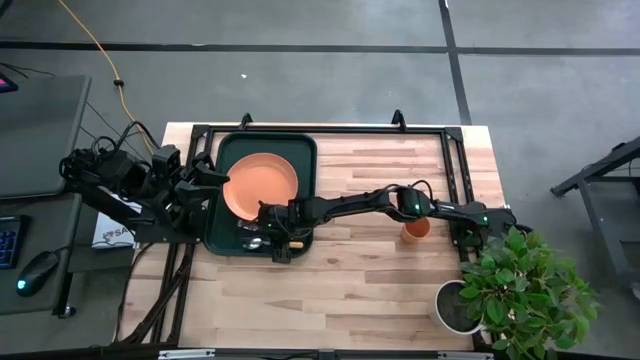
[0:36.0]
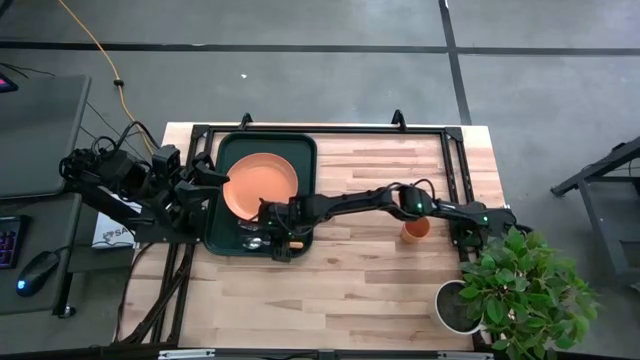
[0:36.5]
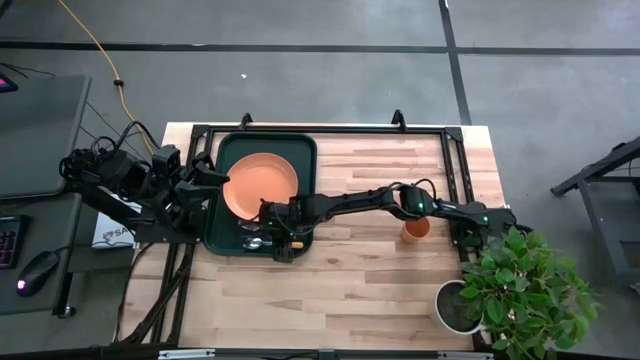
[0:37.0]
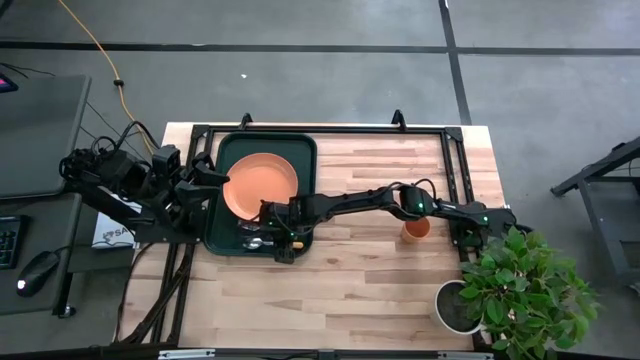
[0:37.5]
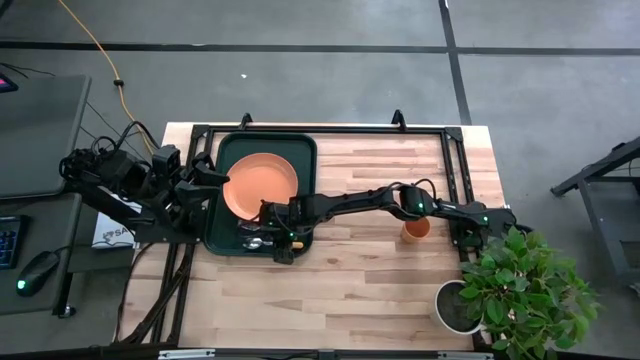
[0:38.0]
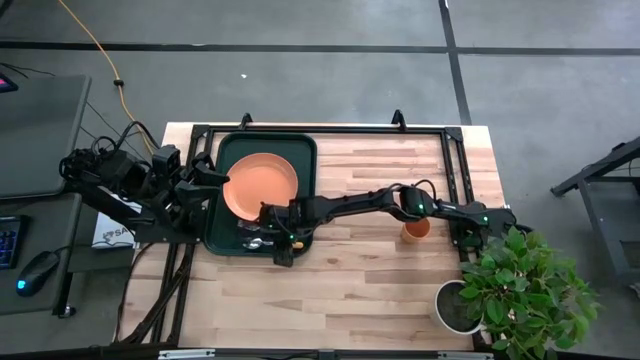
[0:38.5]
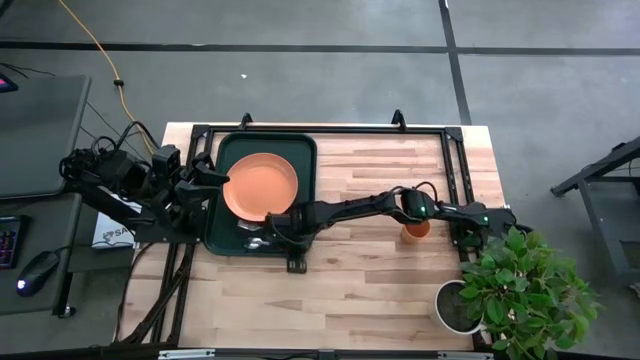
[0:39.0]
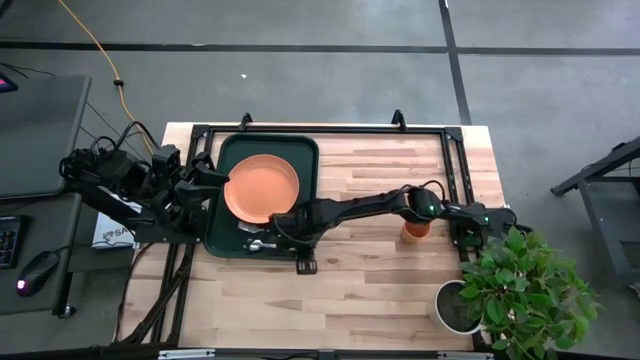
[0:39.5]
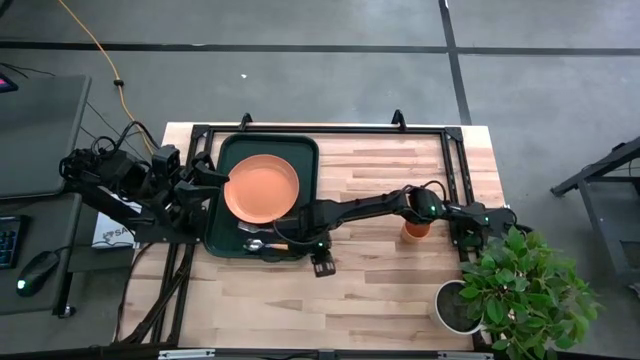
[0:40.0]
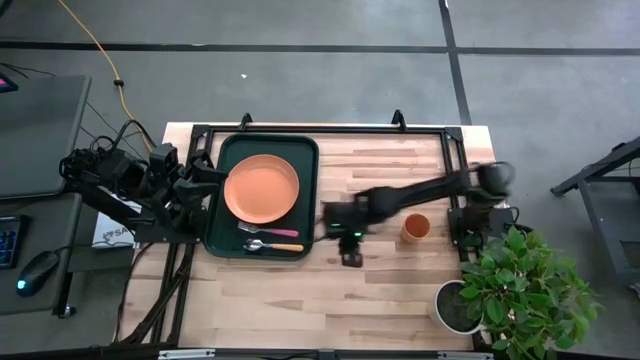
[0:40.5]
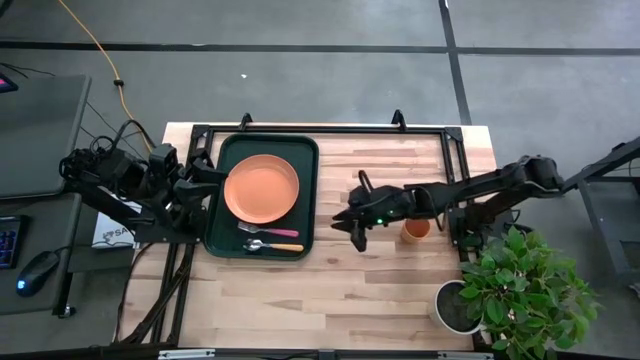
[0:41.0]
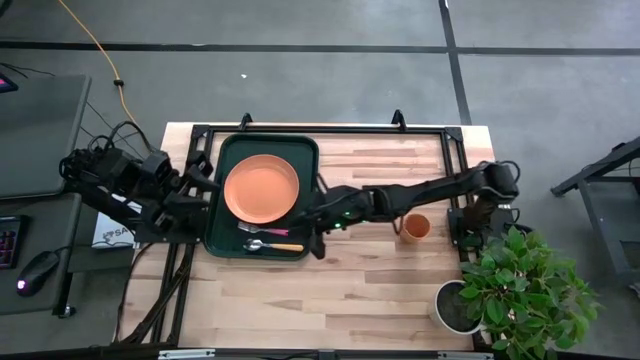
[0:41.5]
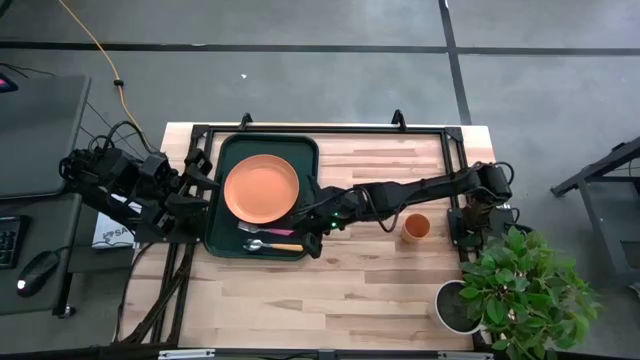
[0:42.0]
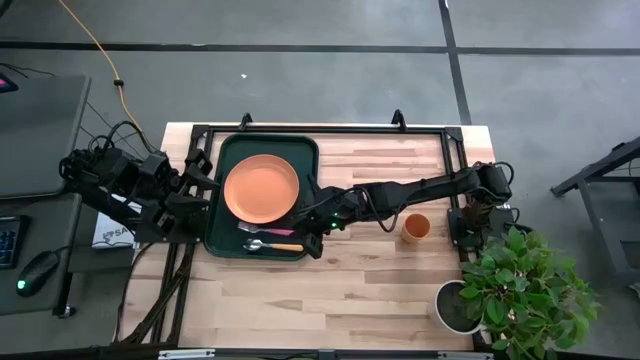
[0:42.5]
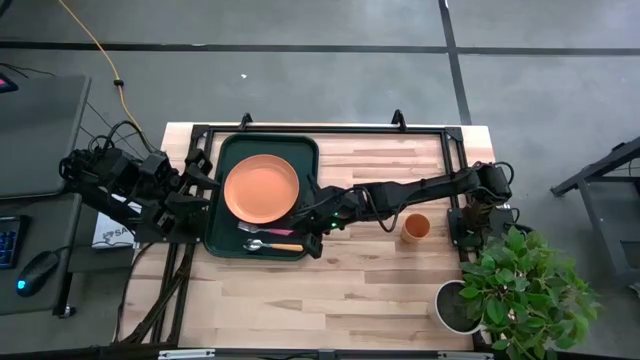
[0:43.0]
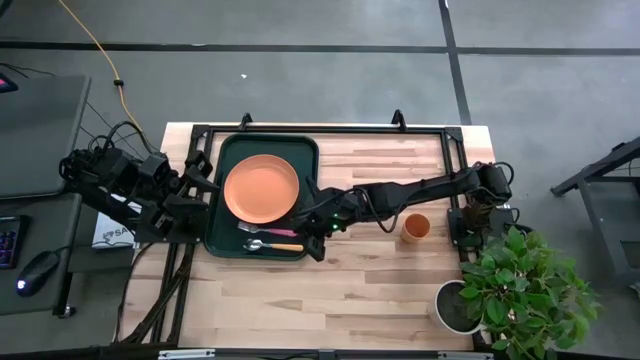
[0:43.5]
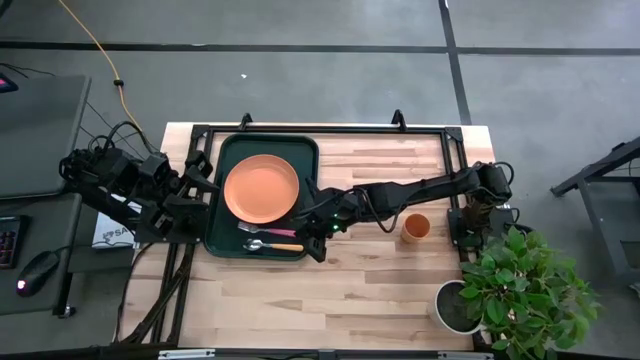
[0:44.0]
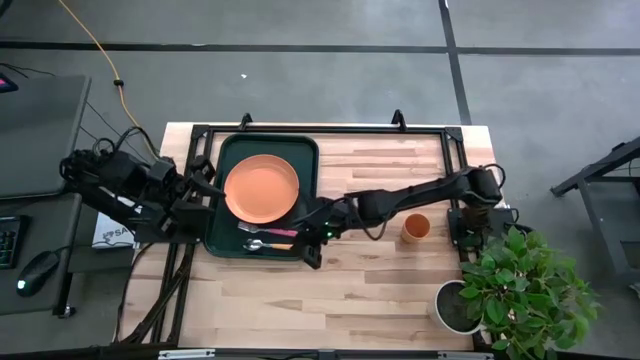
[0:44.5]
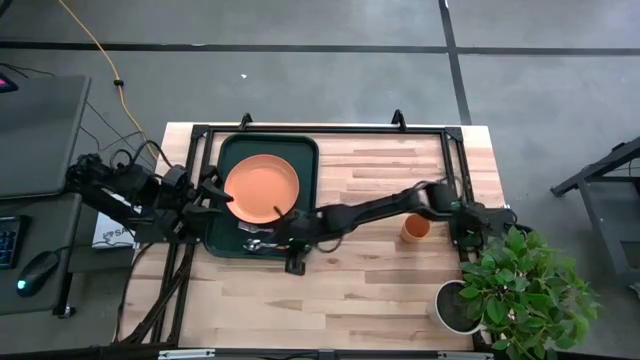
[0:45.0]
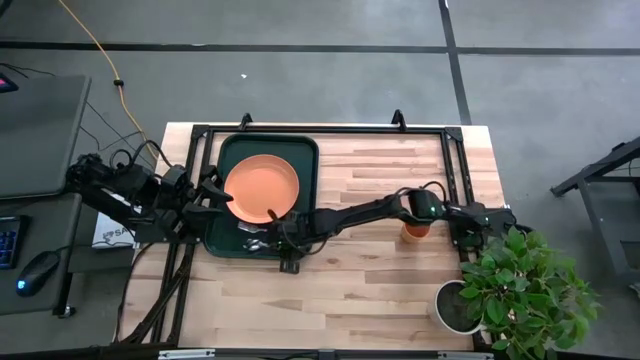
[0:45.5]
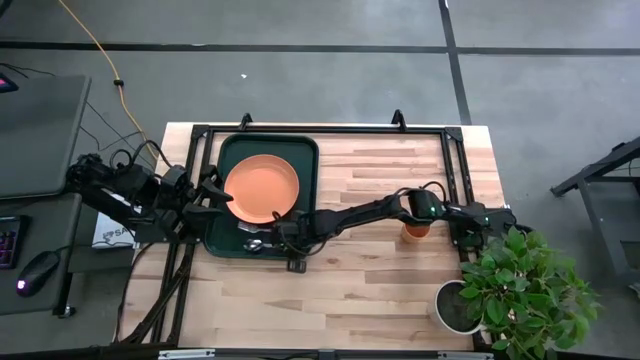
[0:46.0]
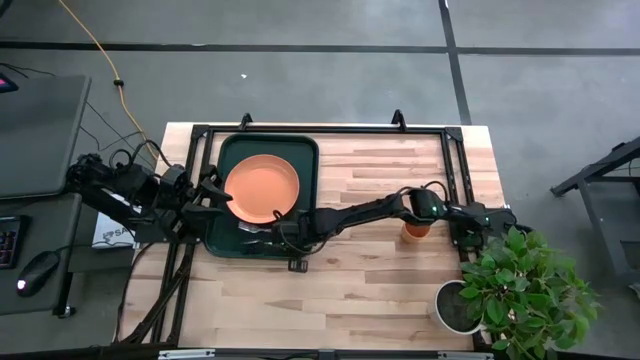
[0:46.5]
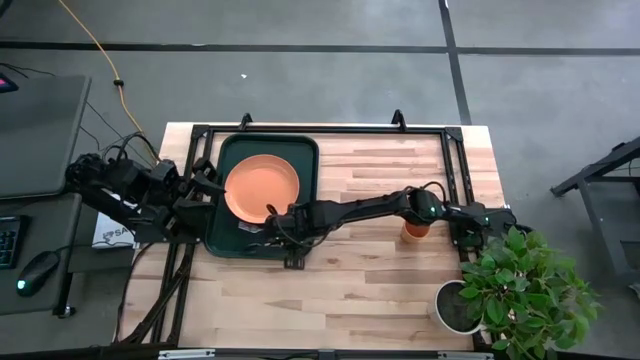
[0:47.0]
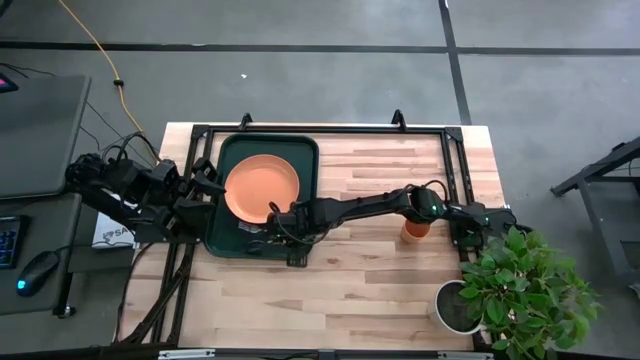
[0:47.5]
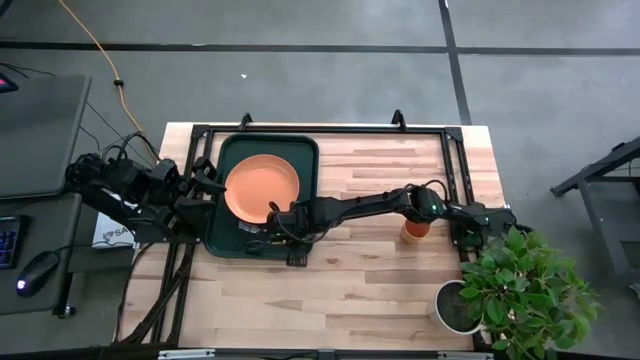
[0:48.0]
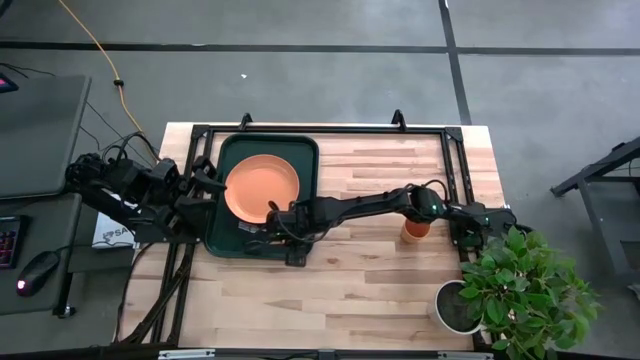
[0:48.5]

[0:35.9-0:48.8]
Task: Pick and place plate/cup/fork/spoon on tray
Put the yellow spoon on the black serving tray to the right side of the pink fork

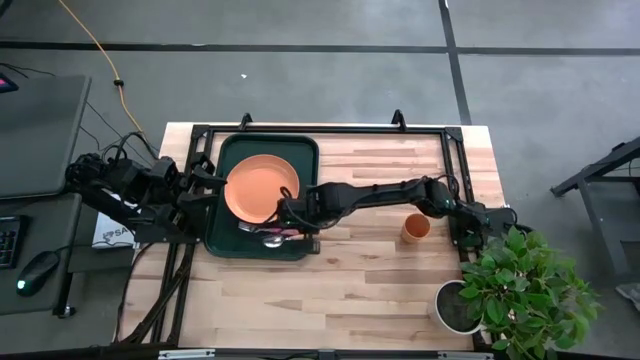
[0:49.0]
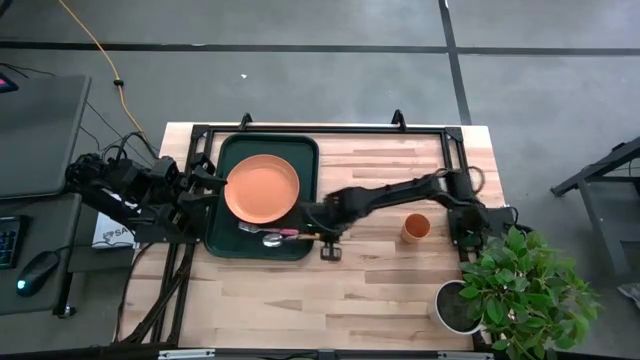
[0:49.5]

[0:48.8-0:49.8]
Put the yellow spoon on the black serving tray to the right side of the pink fork

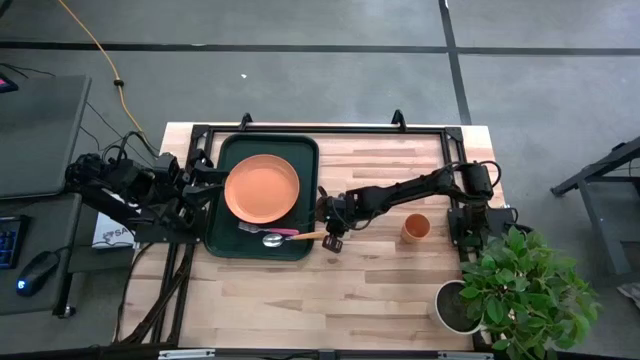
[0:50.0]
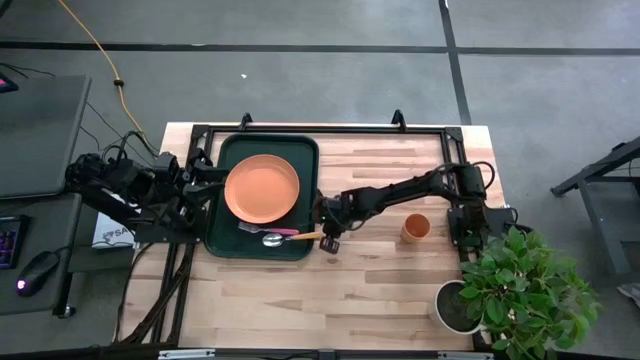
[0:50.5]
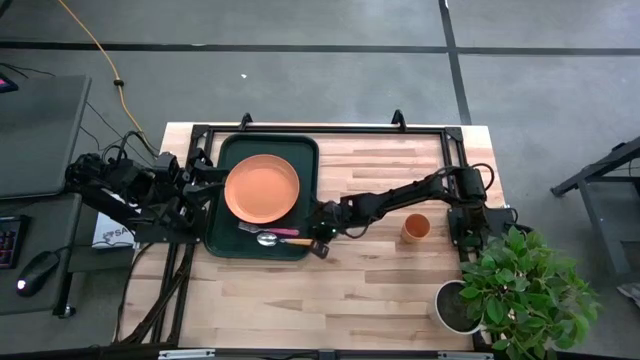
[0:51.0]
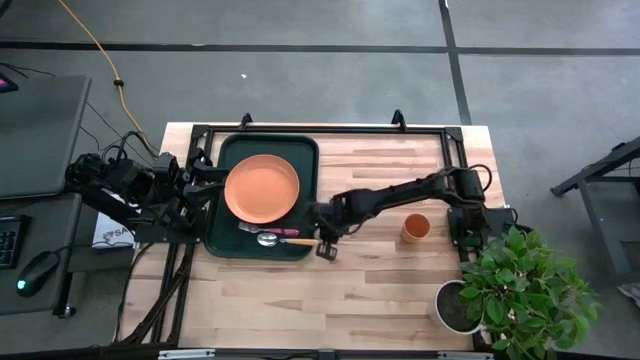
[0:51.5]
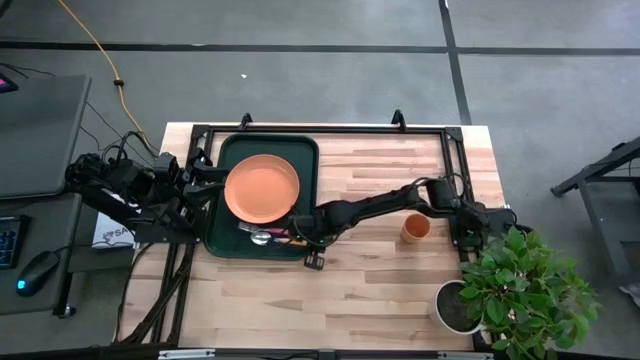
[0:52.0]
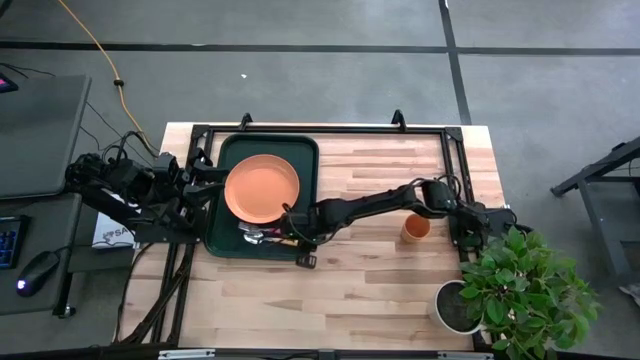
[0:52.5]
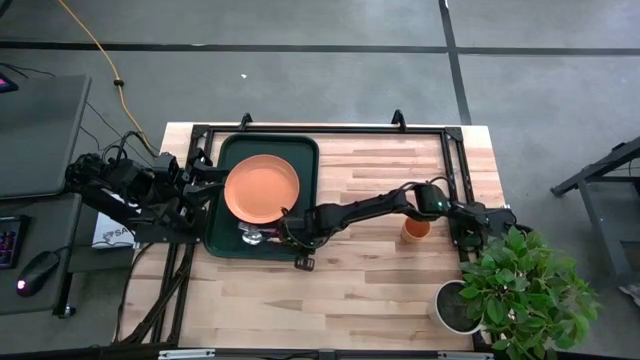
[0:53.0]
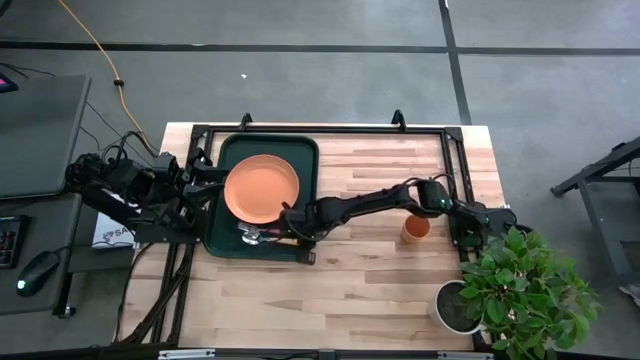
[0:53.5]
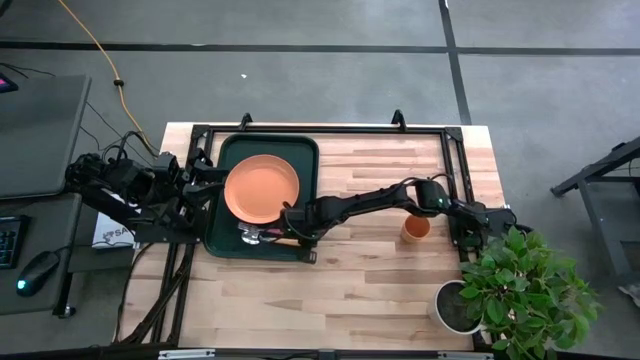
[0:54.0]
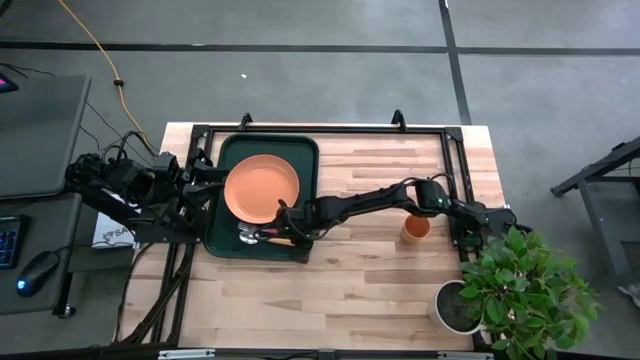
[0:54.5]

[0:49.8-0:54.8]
Put the yellow spoon on the black serving tray to the right side of the pink fork

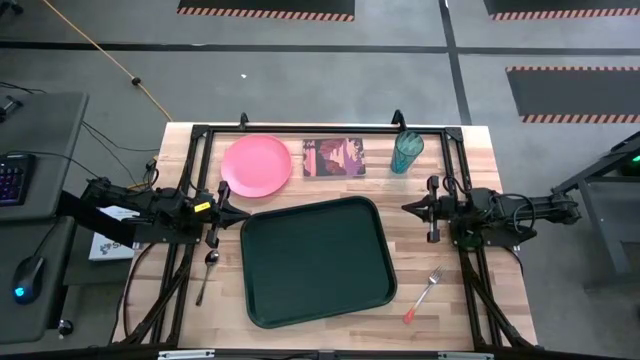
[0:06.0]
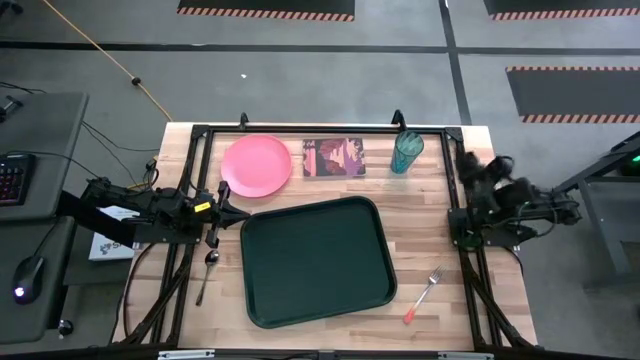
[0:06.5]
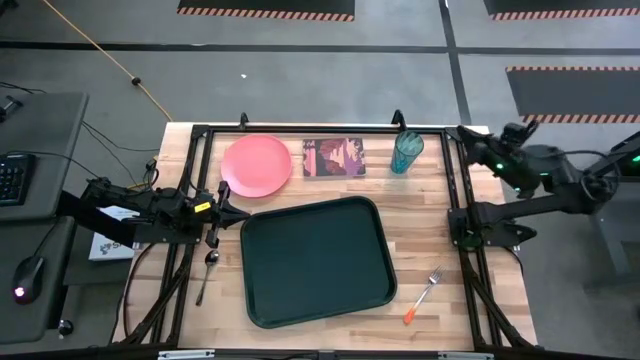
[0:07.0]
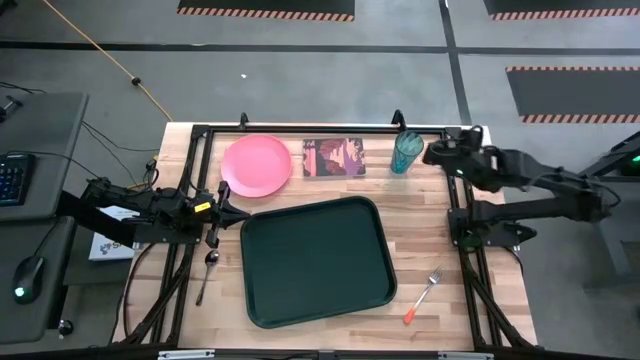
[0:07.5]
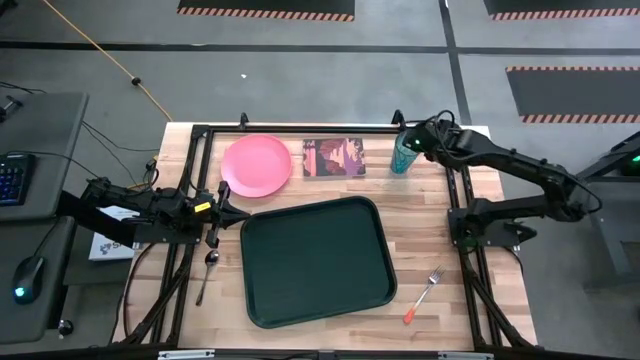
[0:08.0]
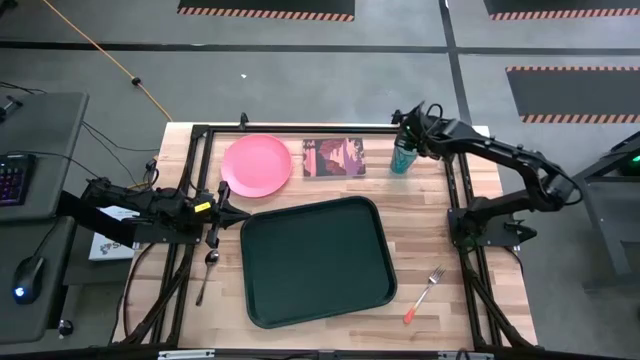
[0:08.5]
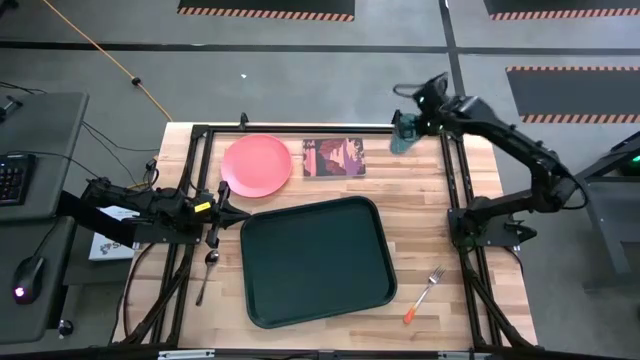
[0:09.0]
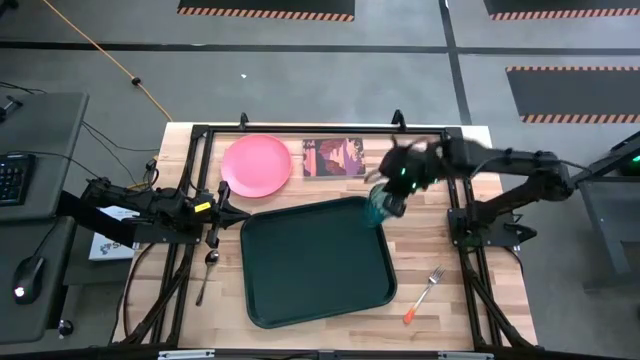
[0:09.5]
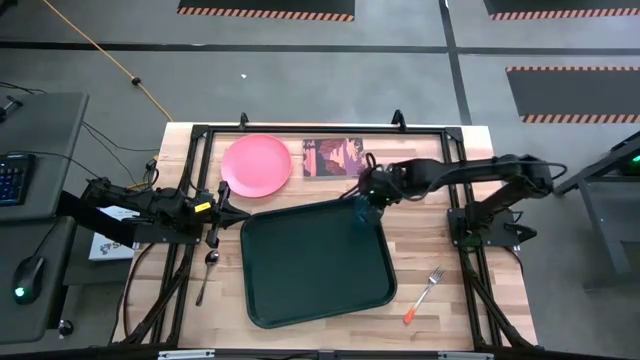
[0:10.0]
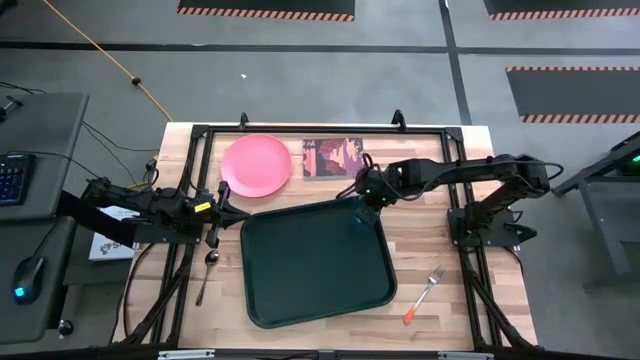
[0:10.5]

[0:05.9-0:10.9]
Task: Pick and place plate/cup/fork/spoon on tray
Put the blue cup to the top right on the black tray
